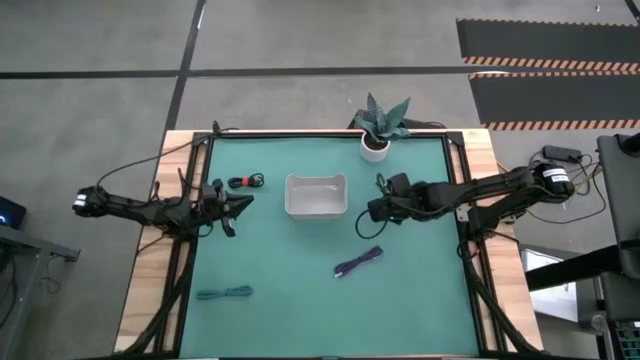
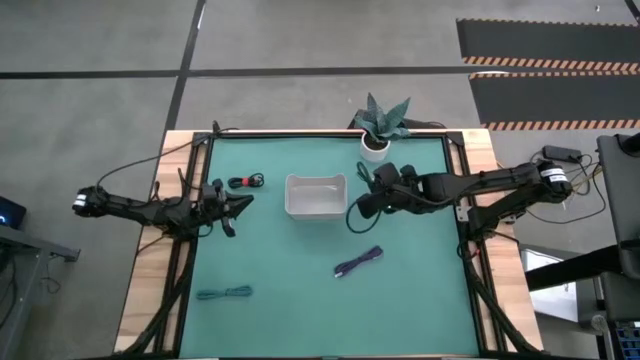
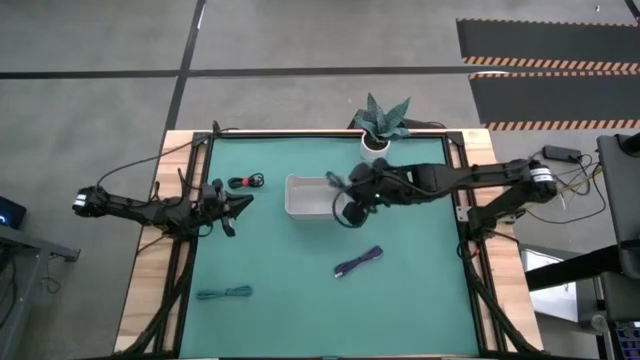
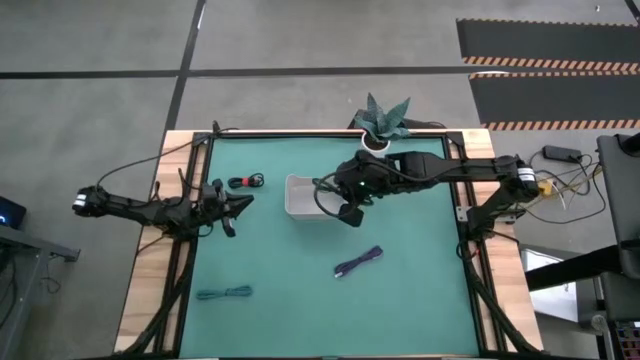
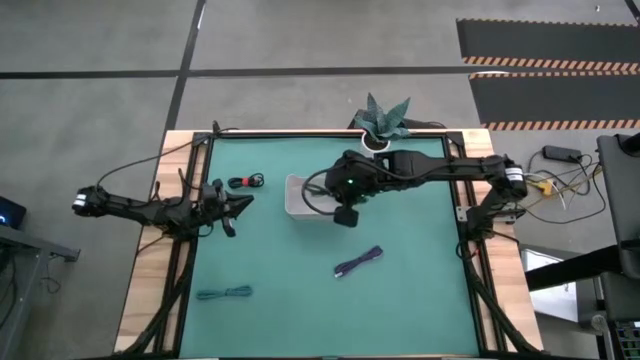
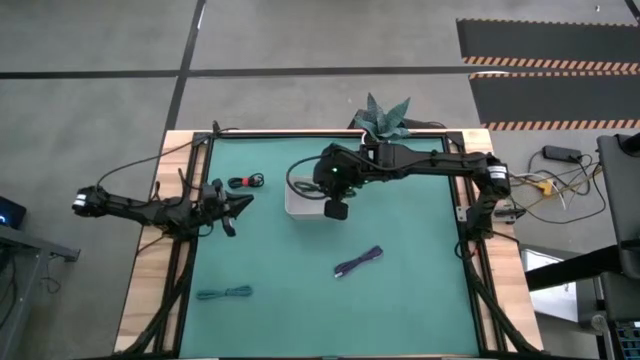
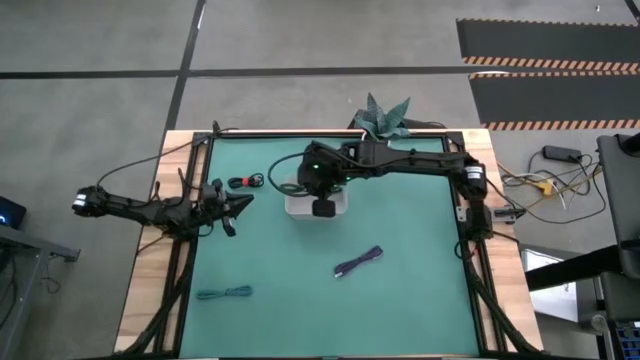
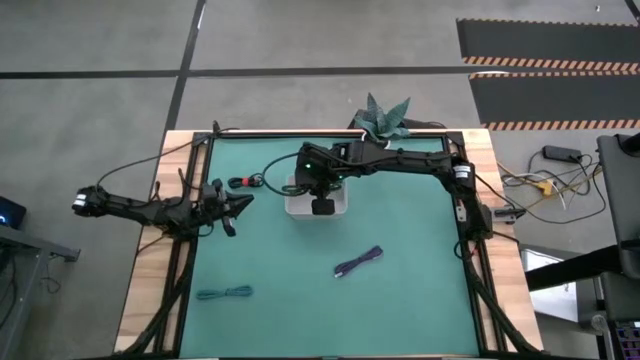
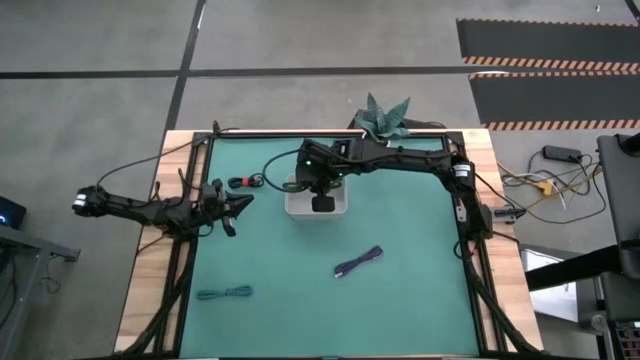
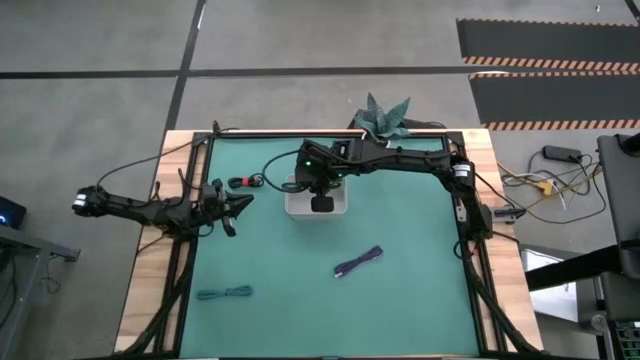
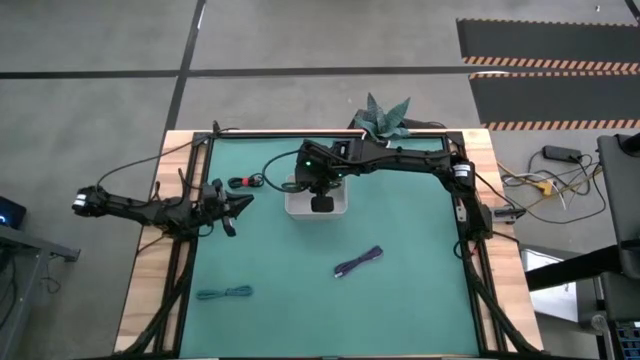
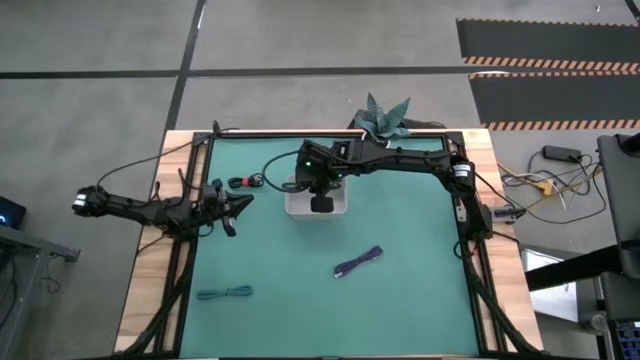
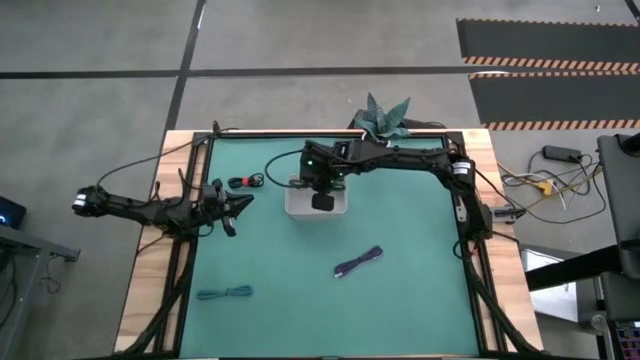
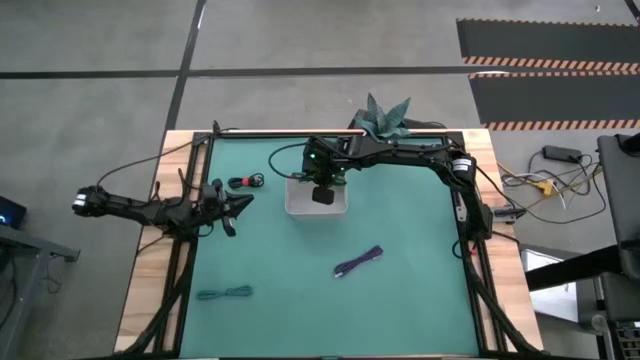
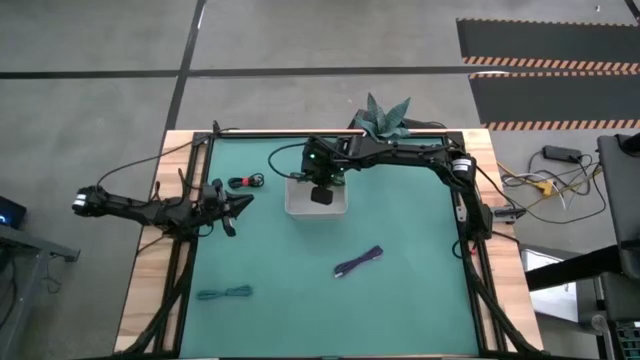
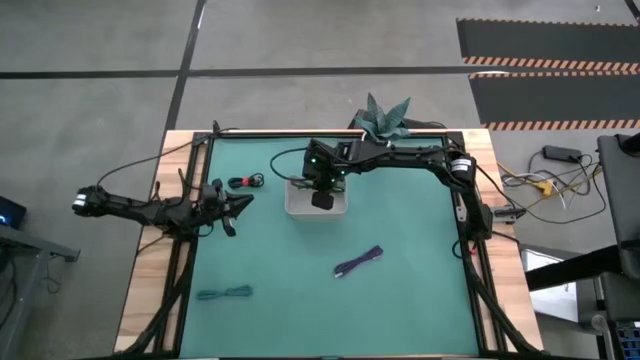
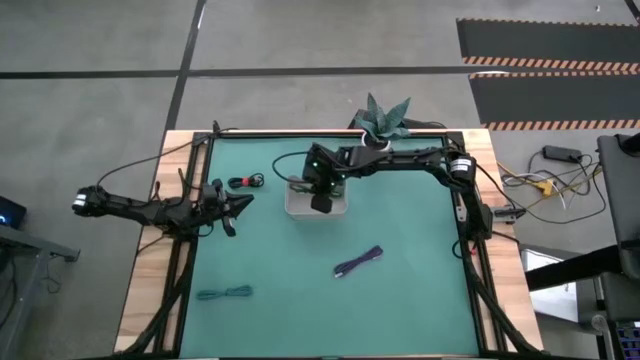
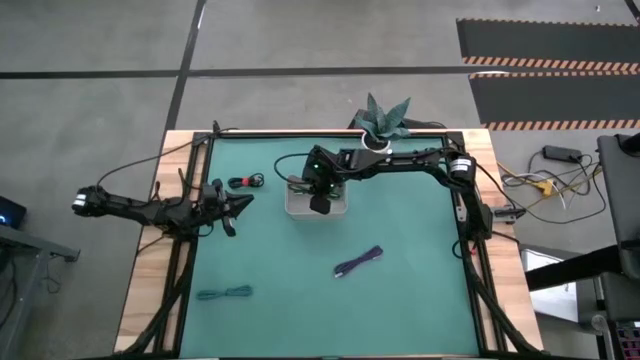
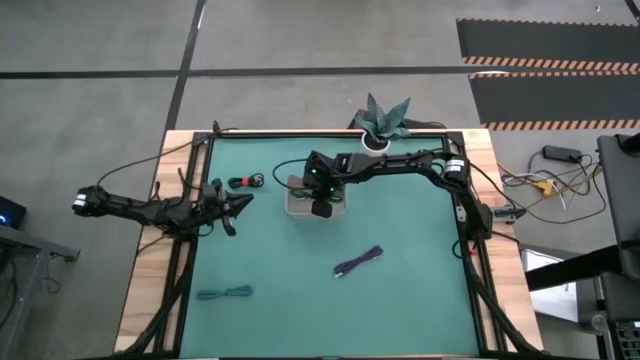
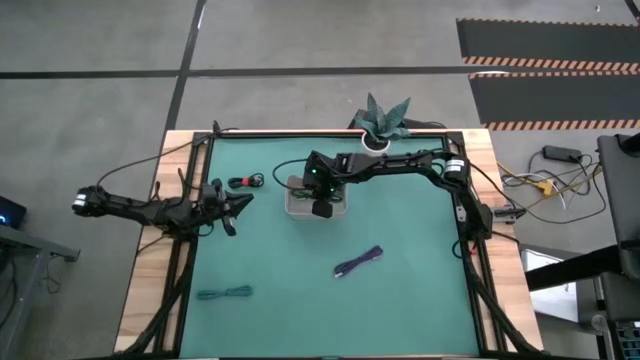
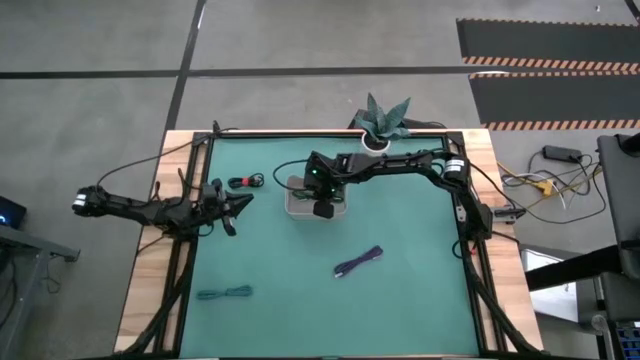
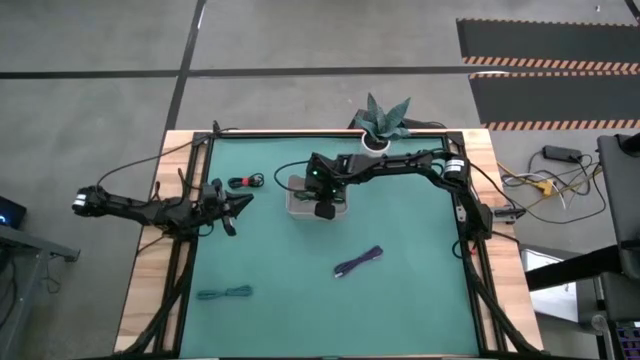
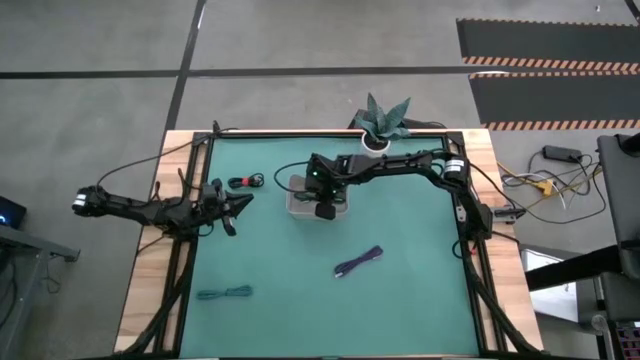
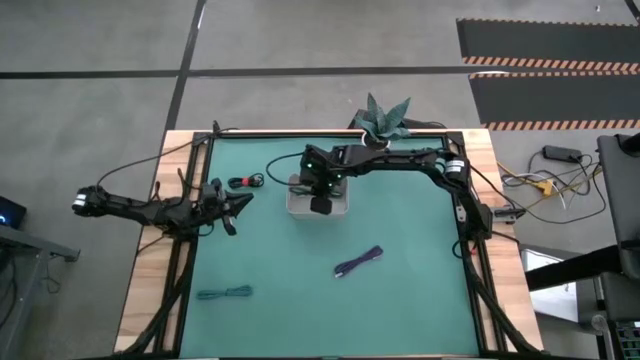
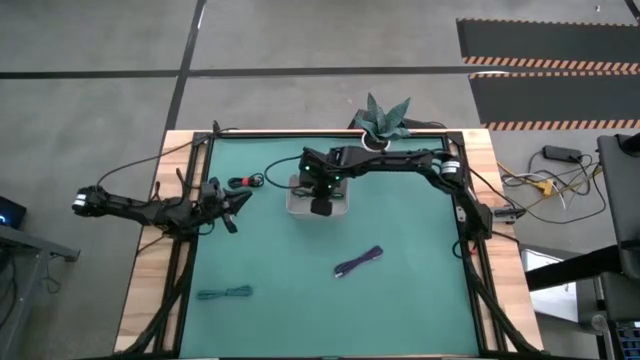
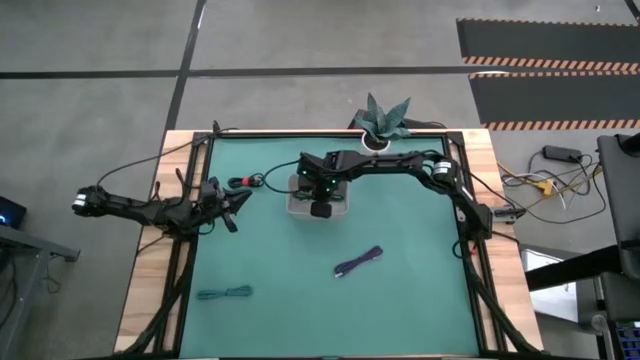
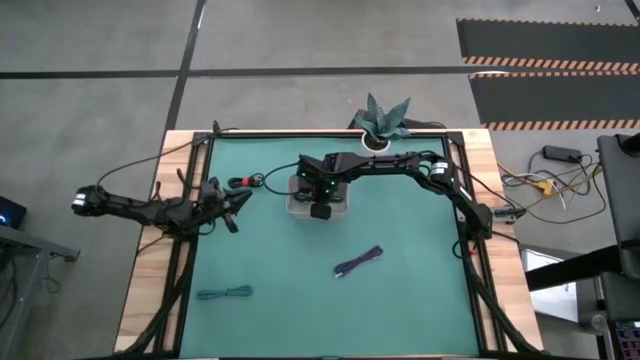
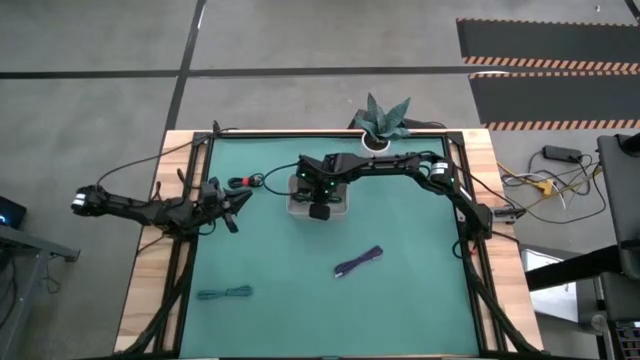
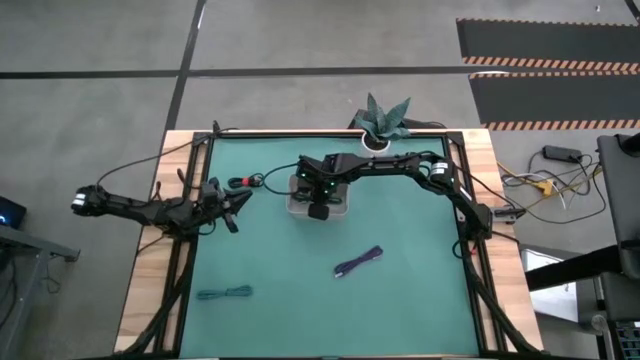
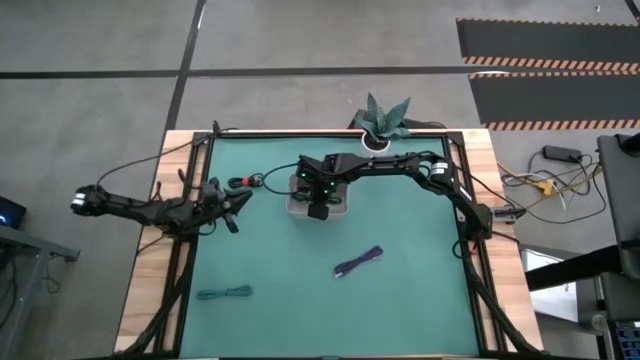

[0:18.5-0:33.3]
Task: Pick and place USB-C Cables
Put the green charger cable into the white bin

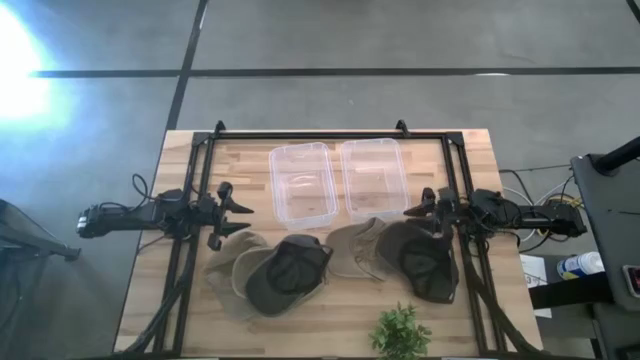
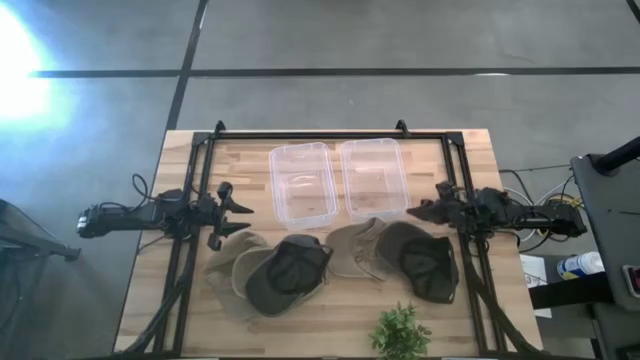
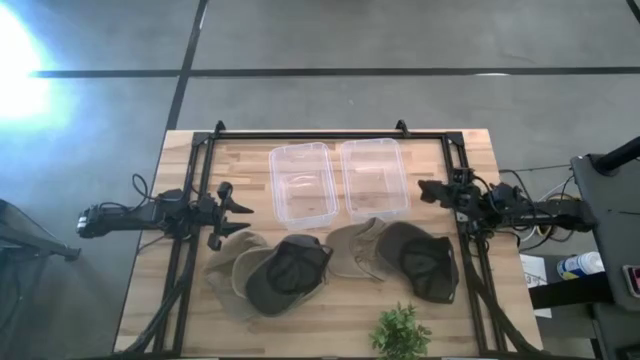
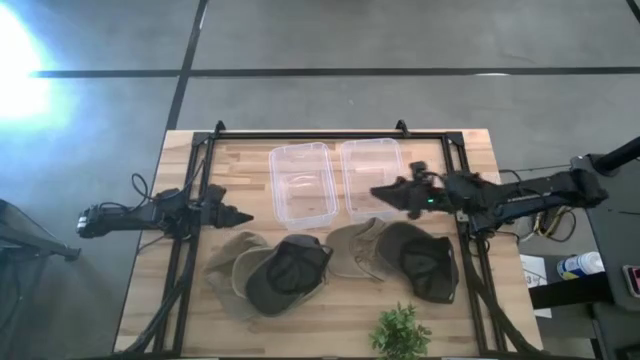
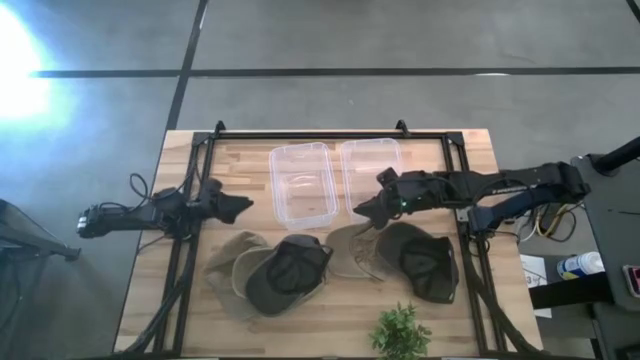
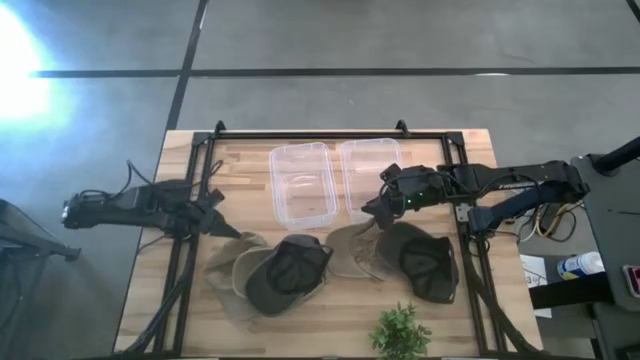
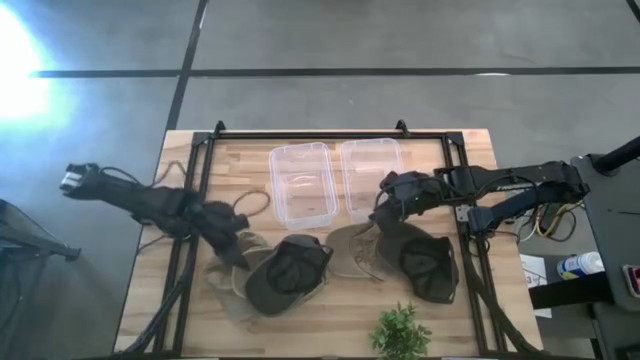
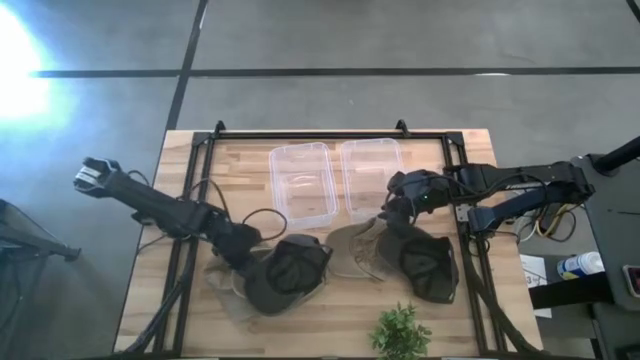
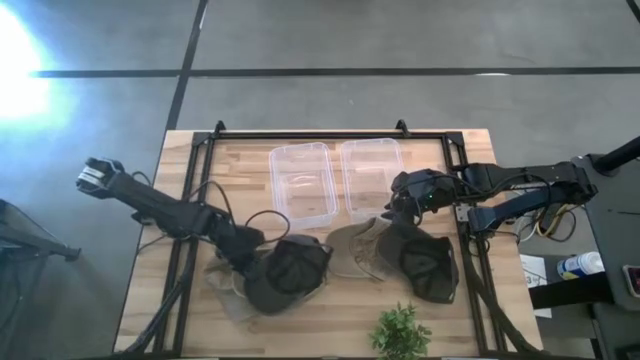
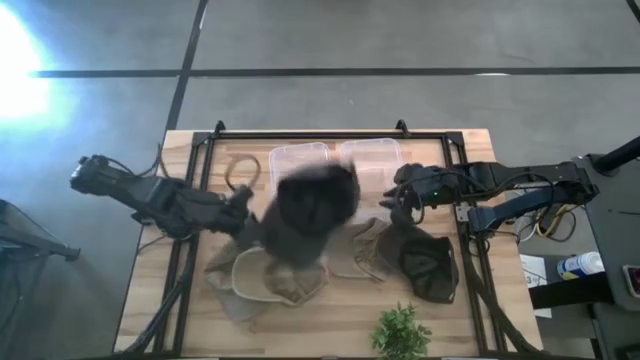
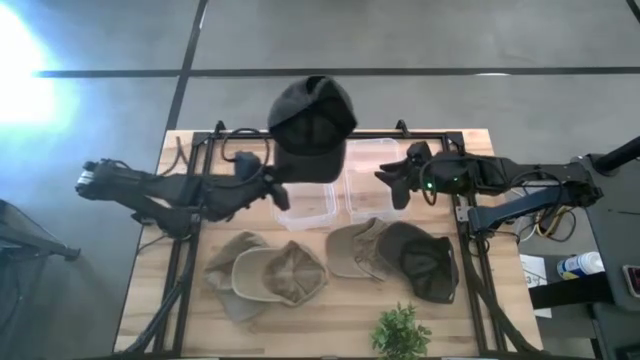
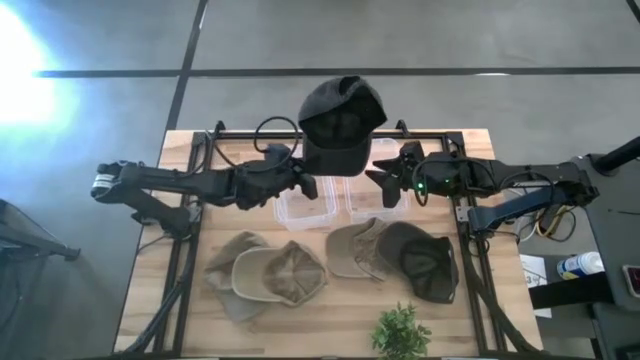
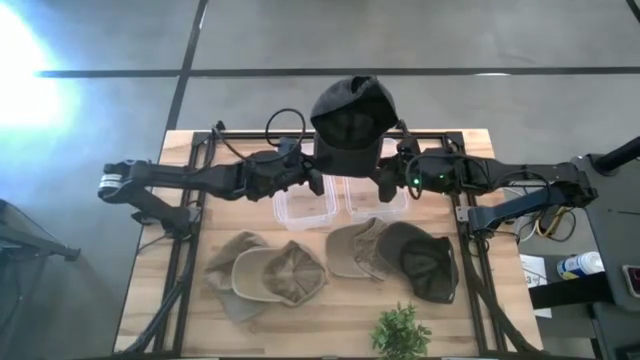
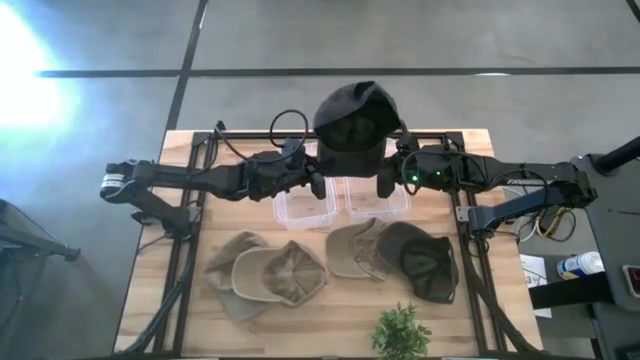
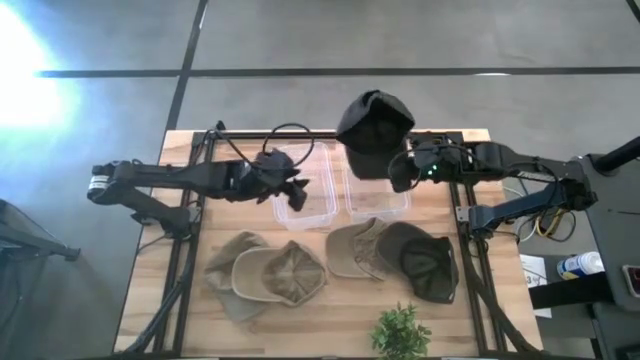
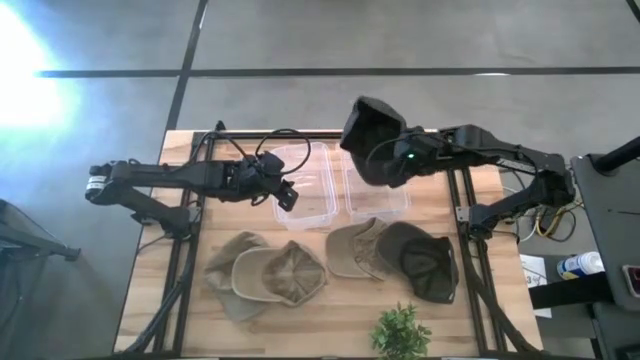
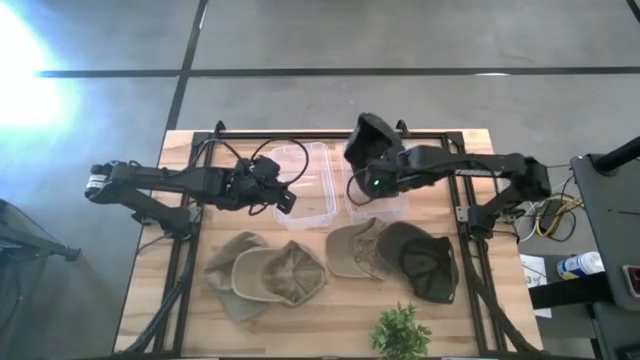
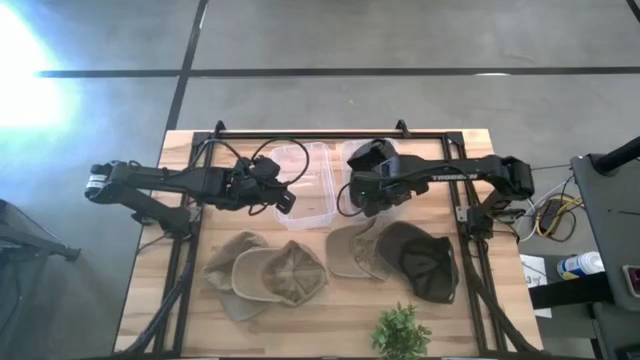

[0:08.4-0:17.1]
Task: Pick & Place hat
Put the left black cap into the right transparent bin
